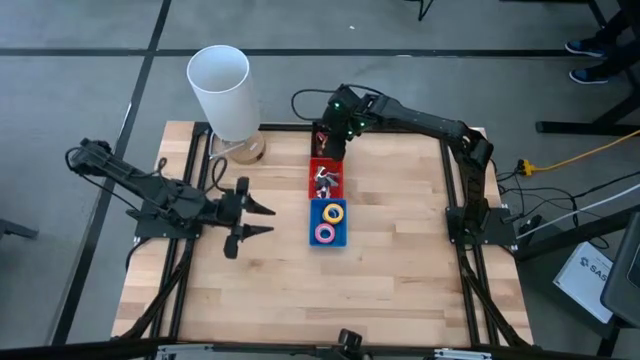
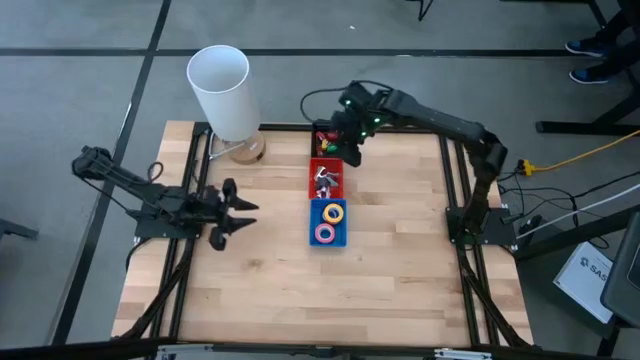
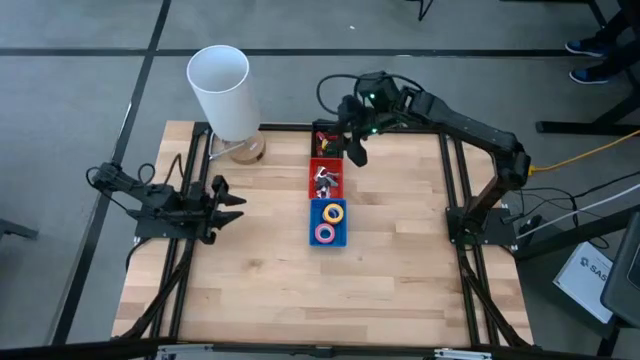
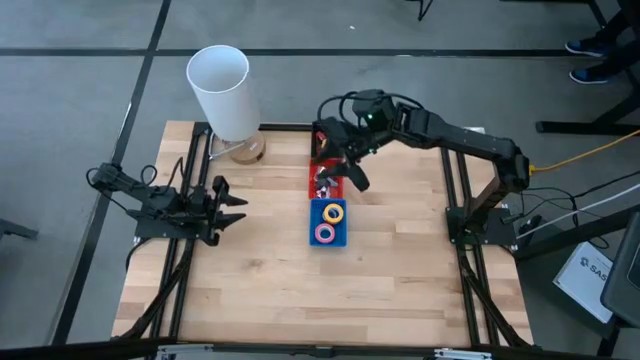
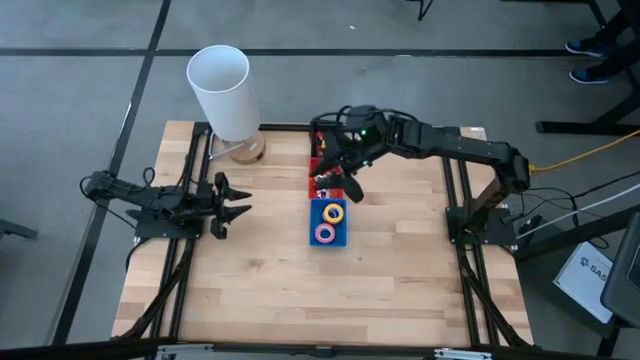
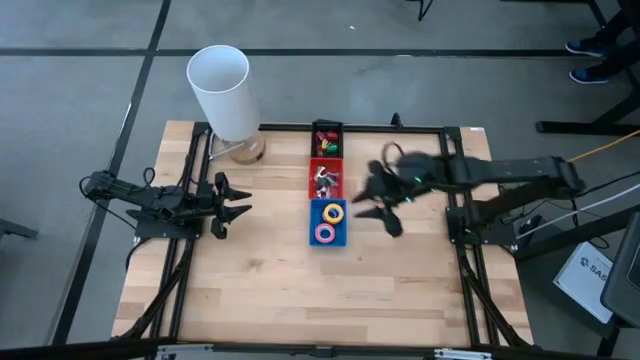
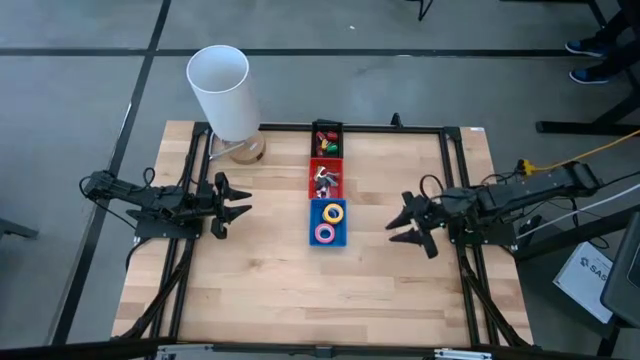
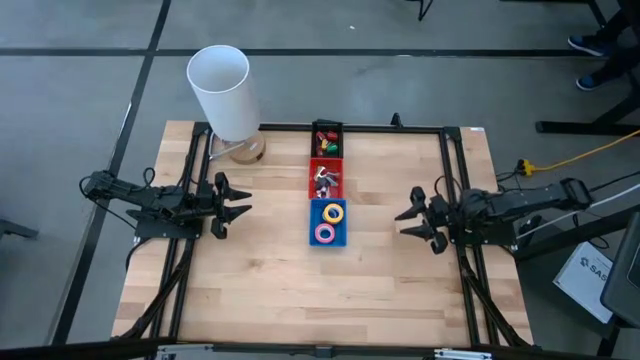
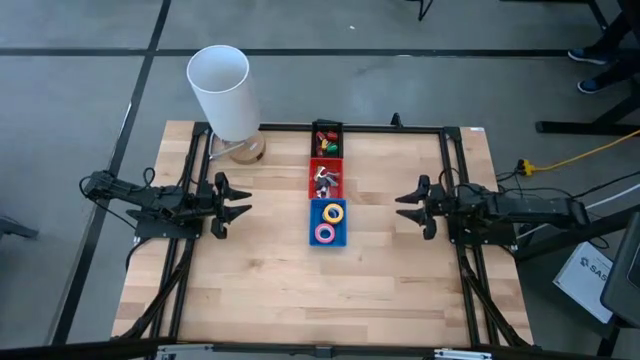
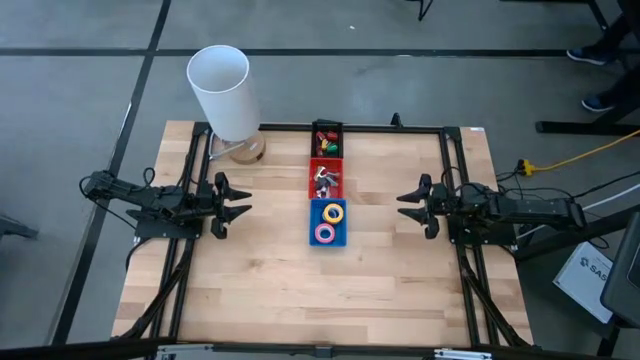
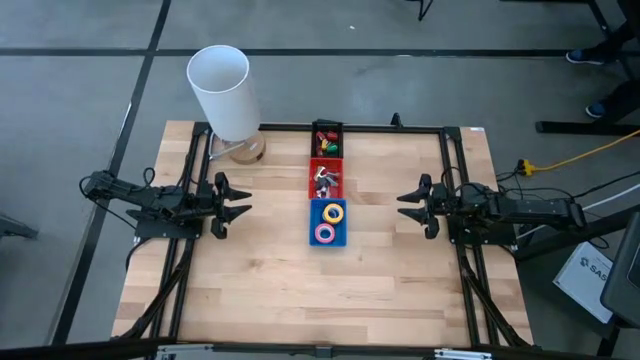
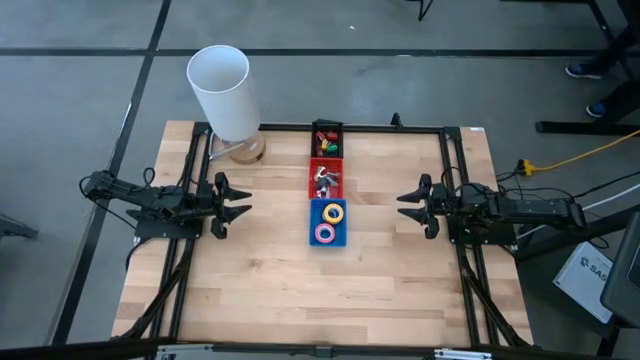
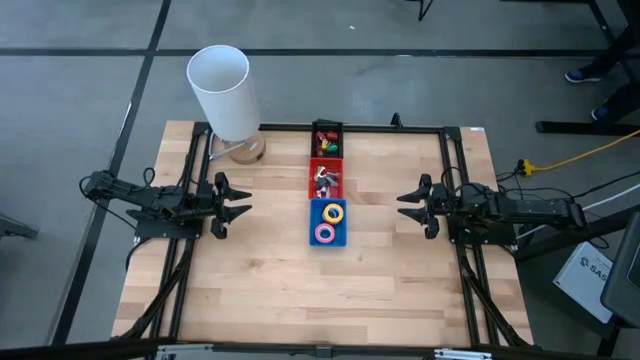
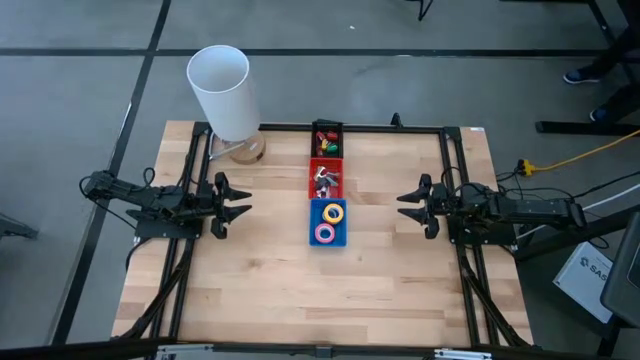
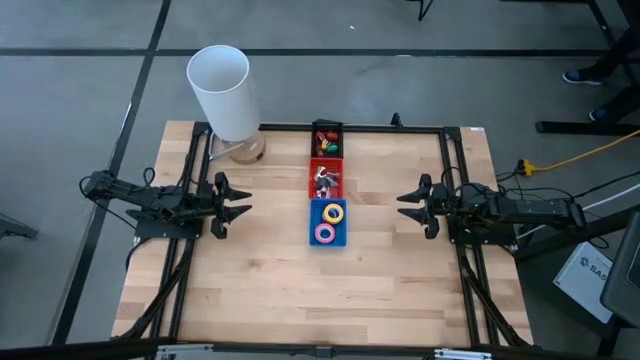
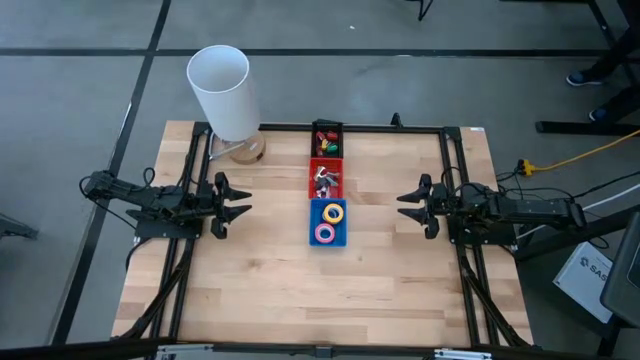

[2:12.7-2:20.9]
Task: Pick and place Stapler, Stapler remover, tape
Return to Home Position

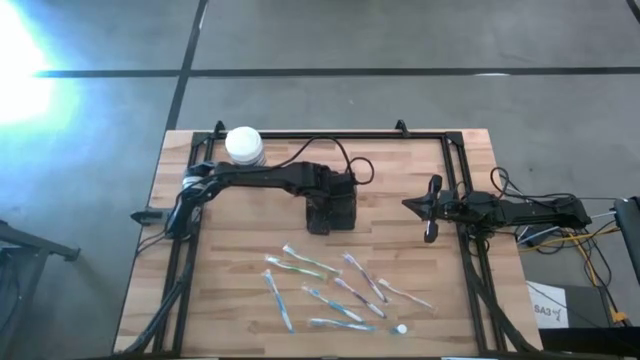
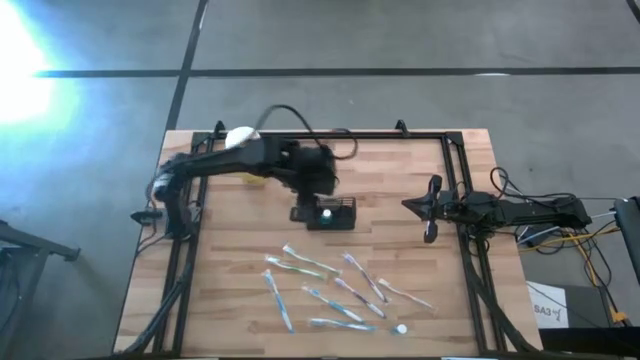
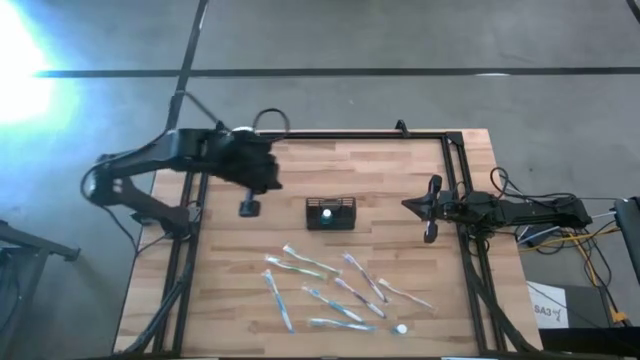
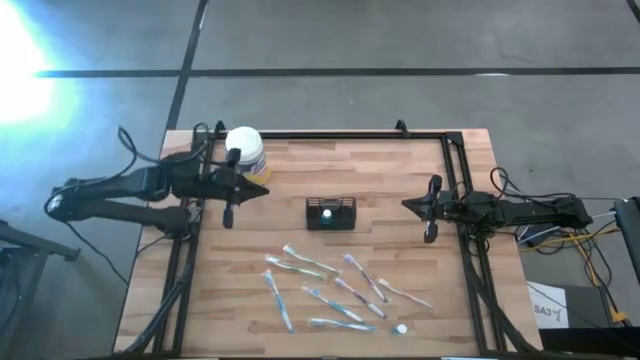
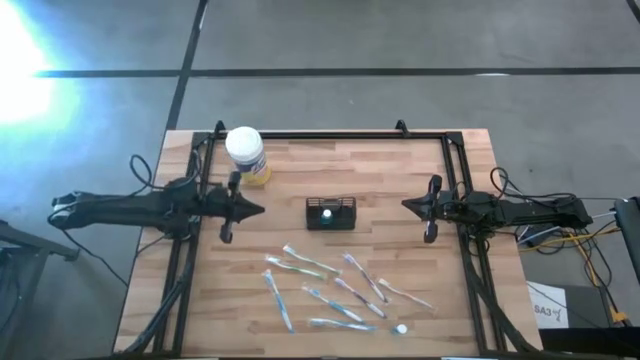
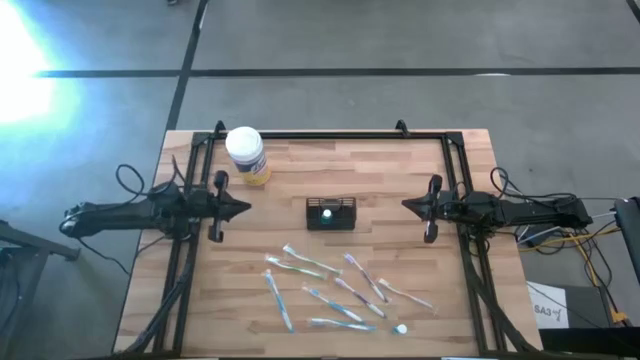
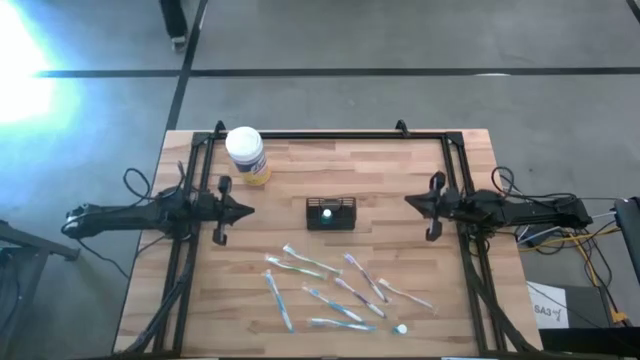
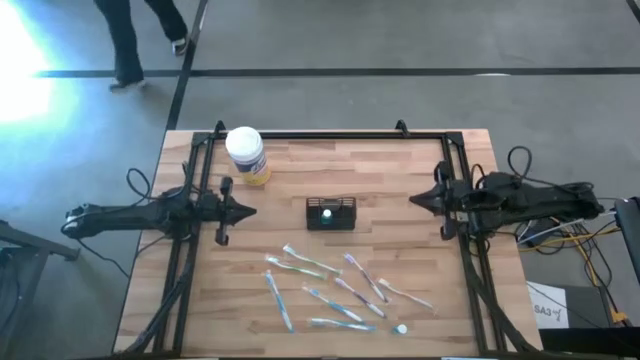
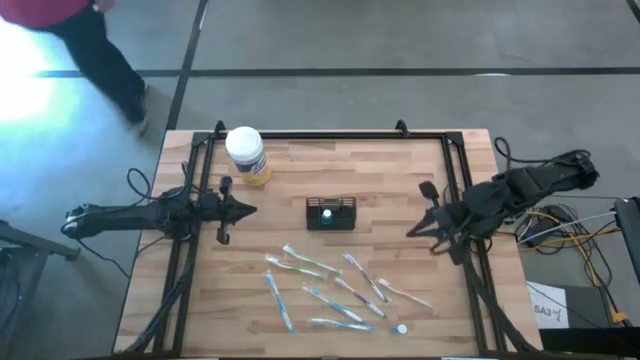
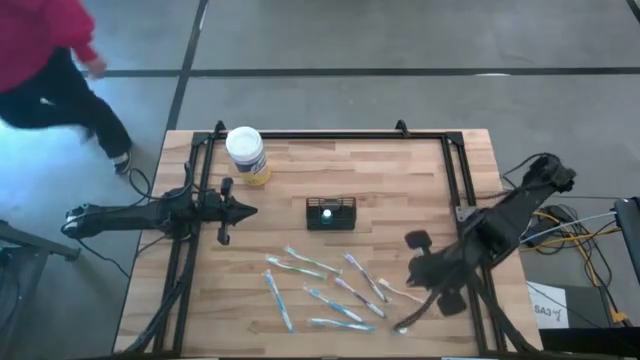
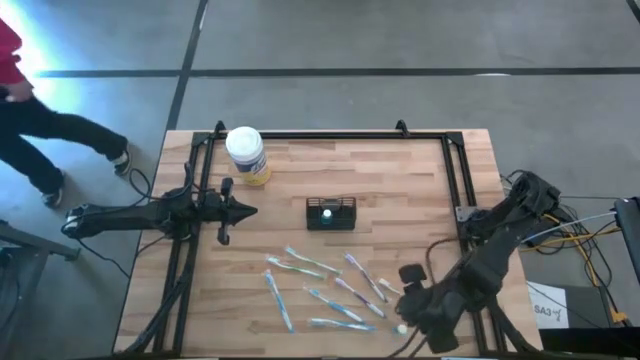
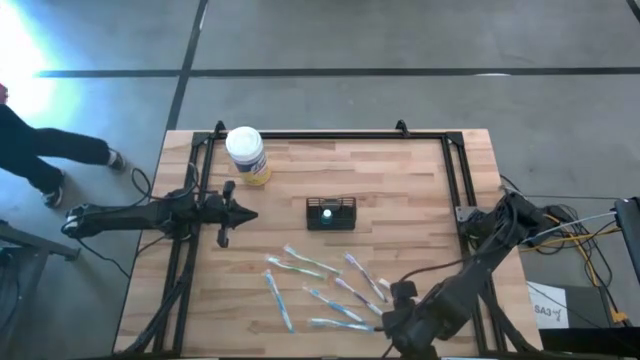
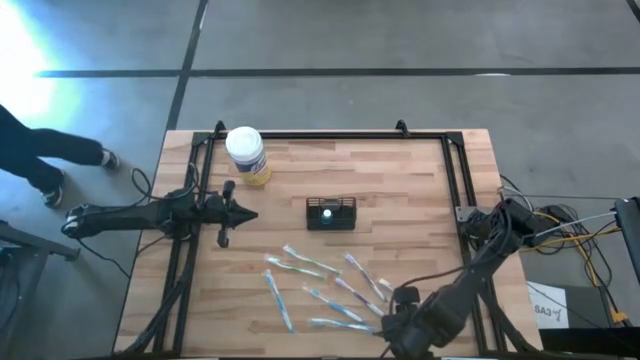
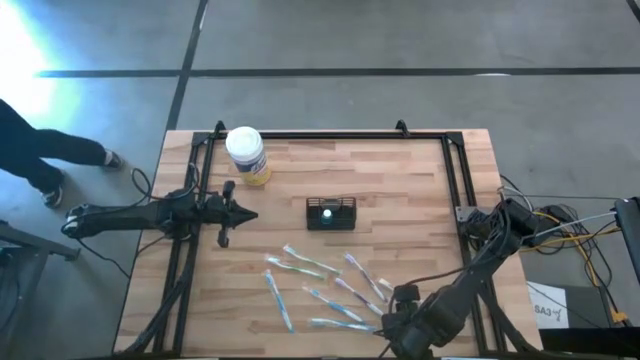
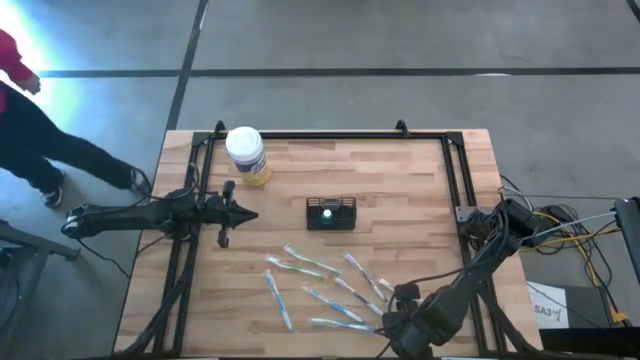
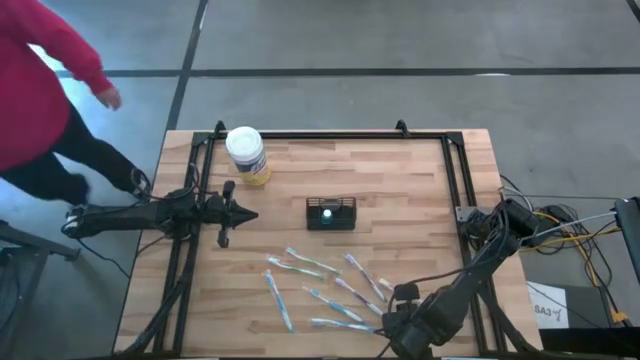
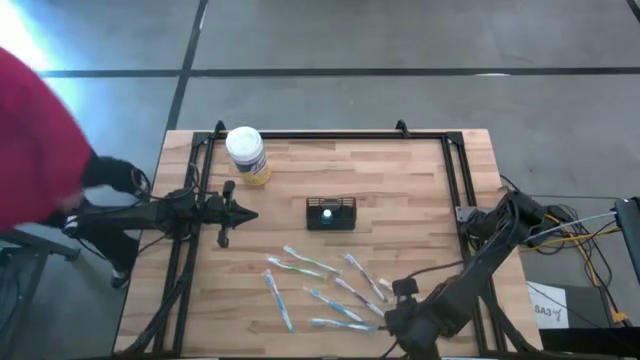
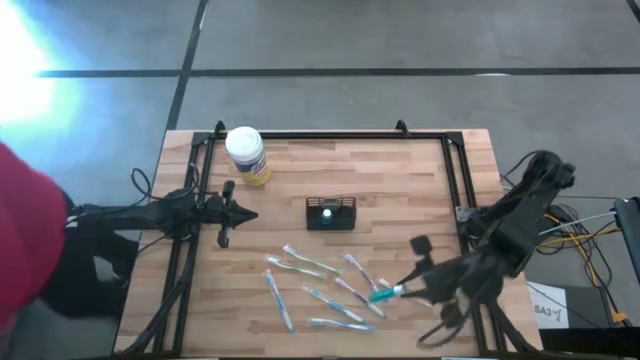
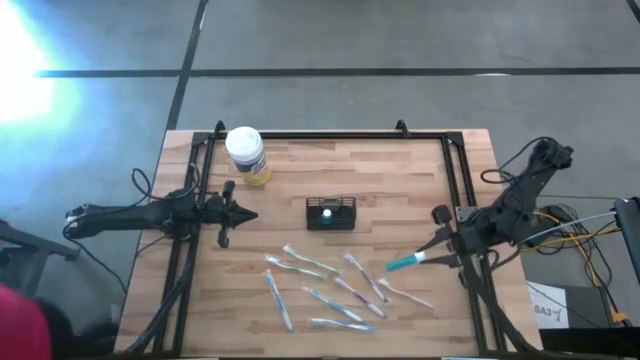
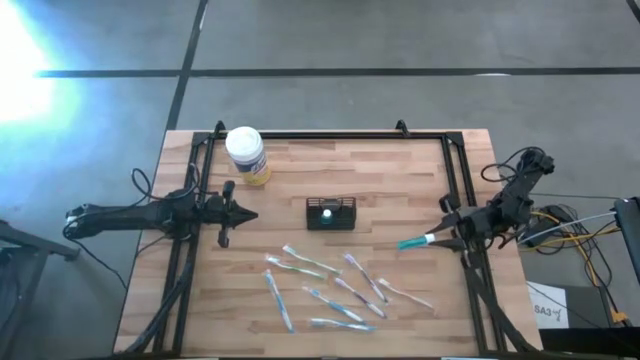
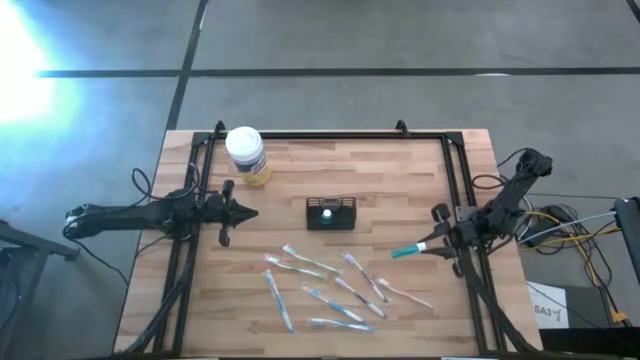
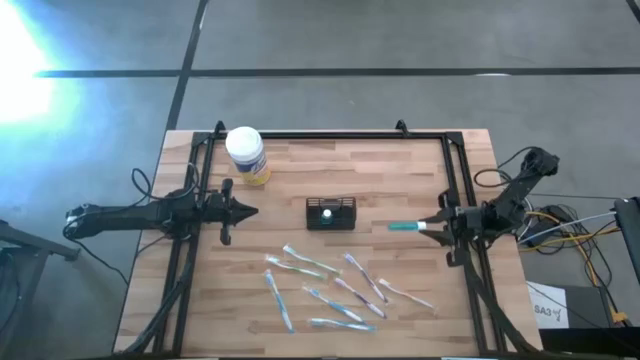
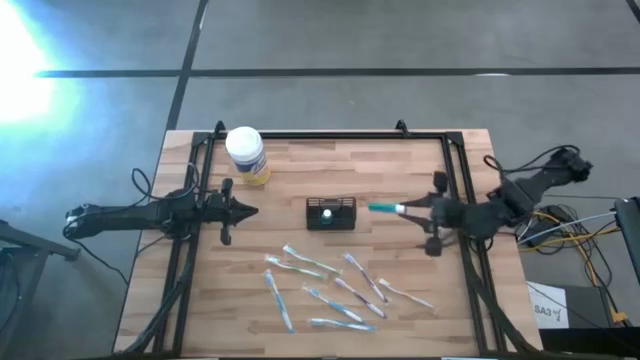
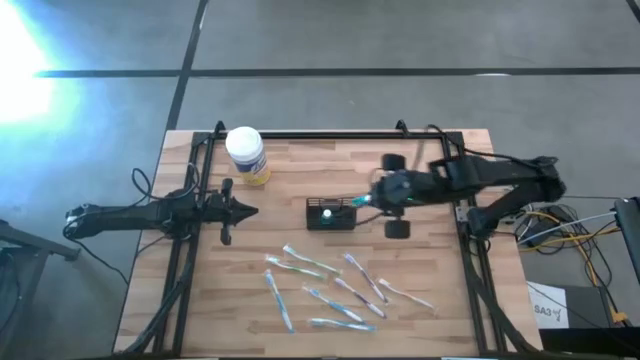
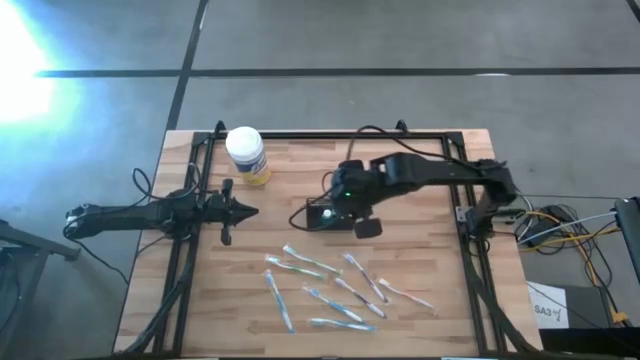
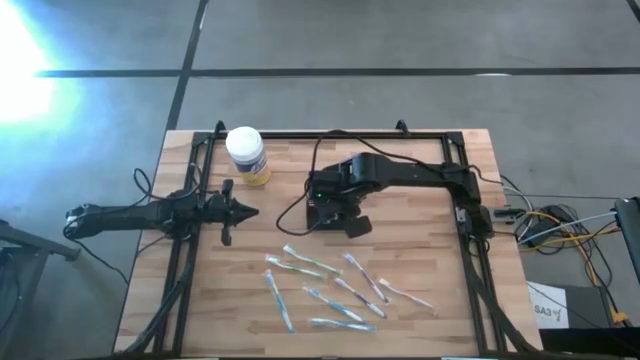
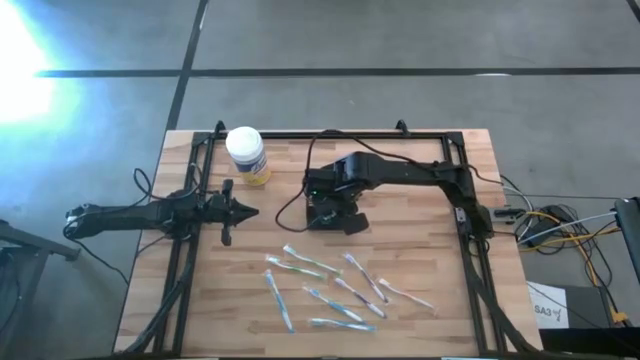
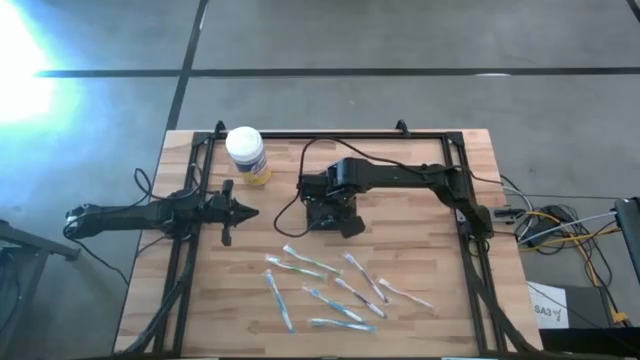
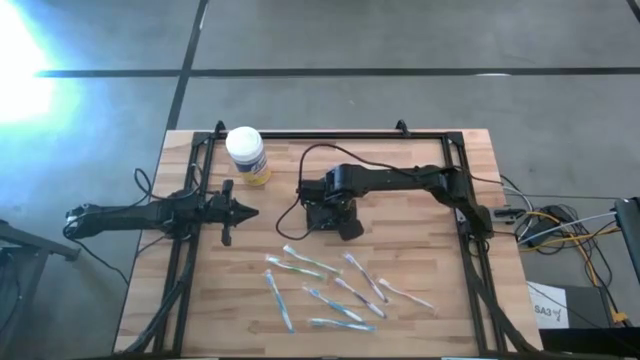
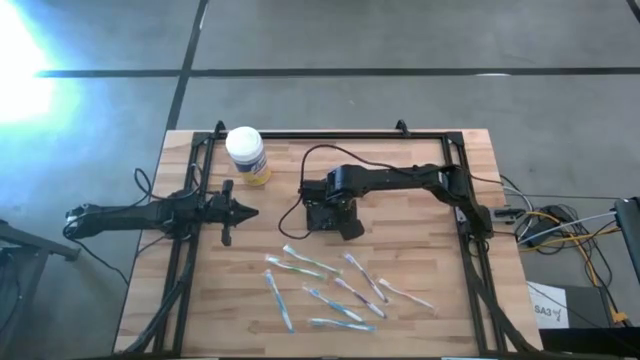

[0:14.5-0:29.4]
Task: Pick & Place toothbrushing station
Put the blue mouthwash into the wire organizer
